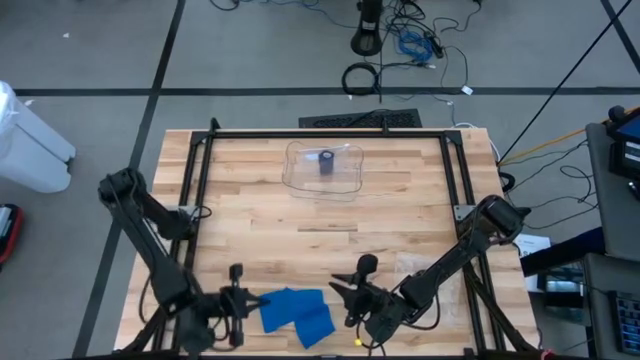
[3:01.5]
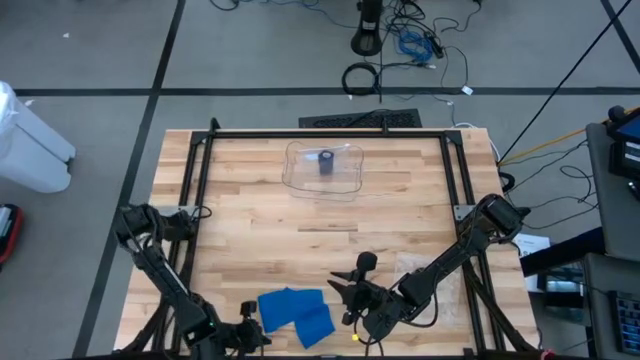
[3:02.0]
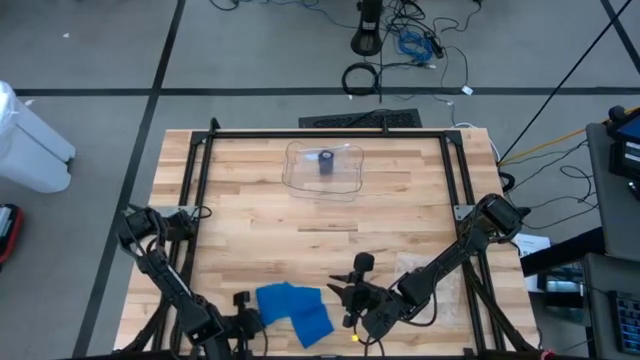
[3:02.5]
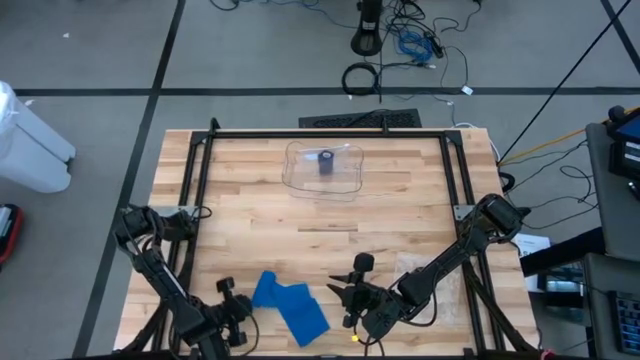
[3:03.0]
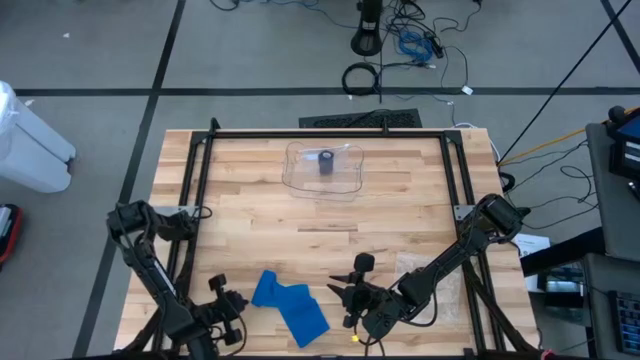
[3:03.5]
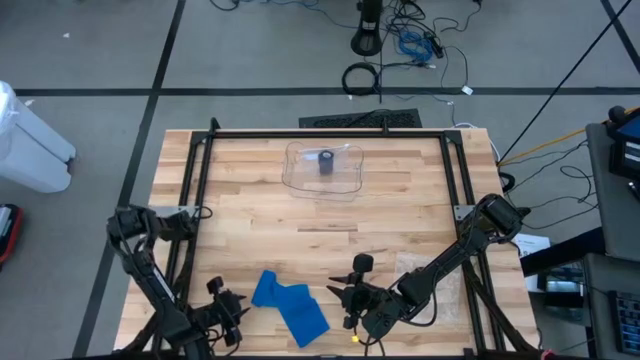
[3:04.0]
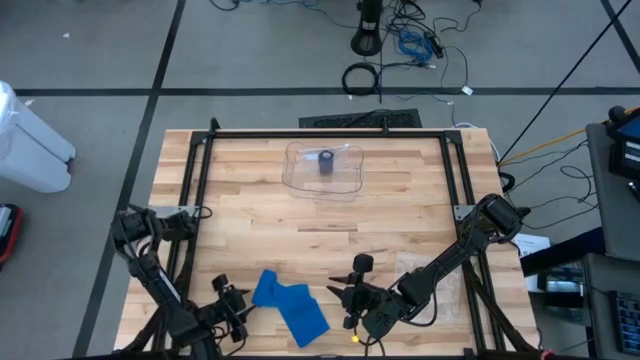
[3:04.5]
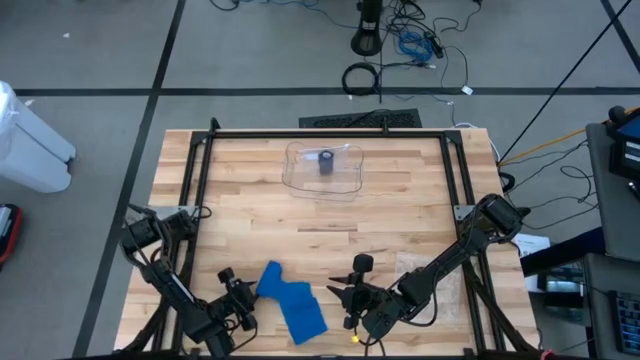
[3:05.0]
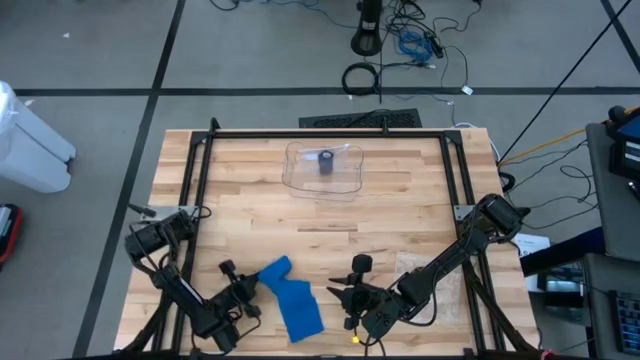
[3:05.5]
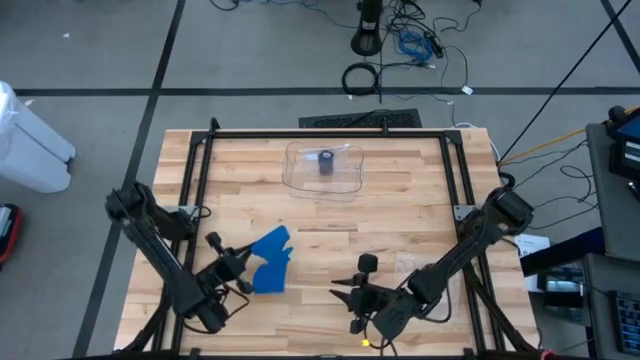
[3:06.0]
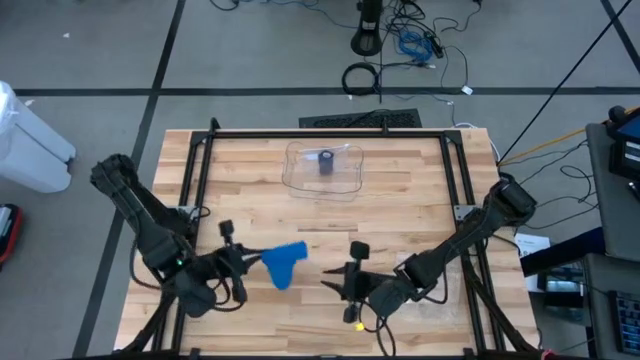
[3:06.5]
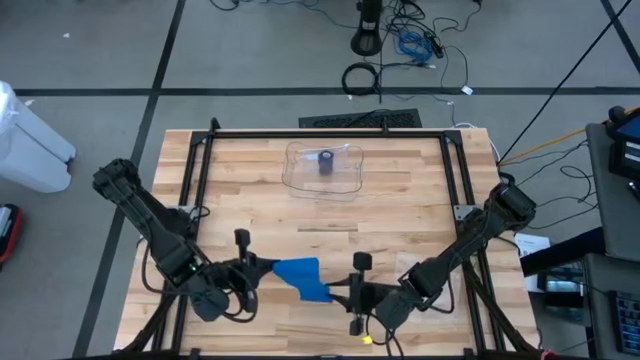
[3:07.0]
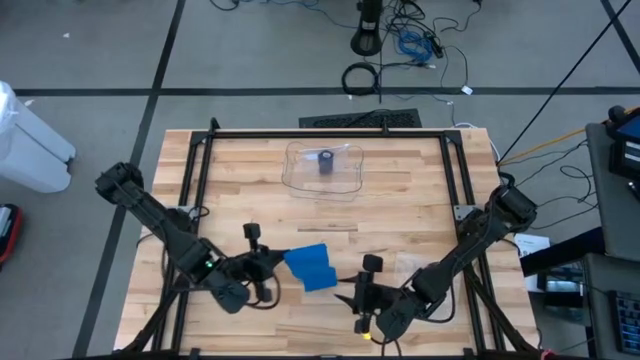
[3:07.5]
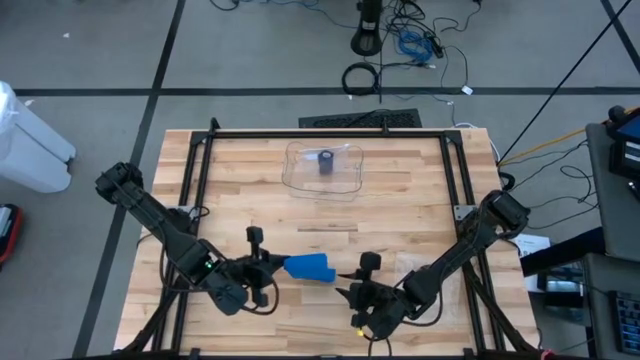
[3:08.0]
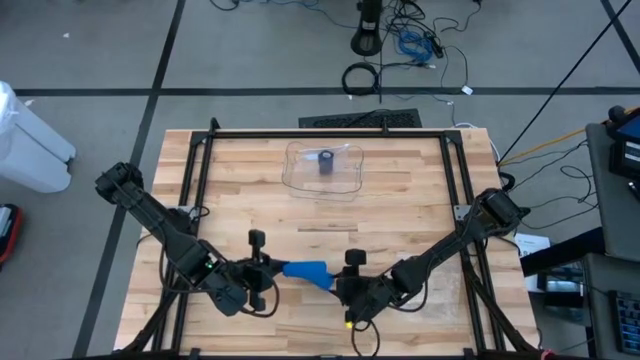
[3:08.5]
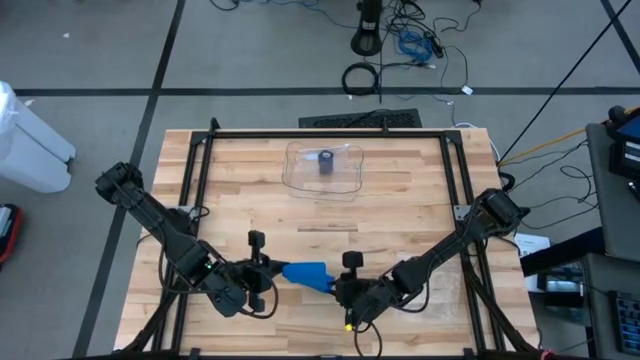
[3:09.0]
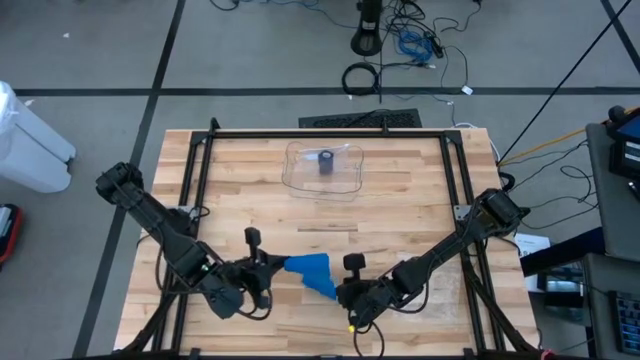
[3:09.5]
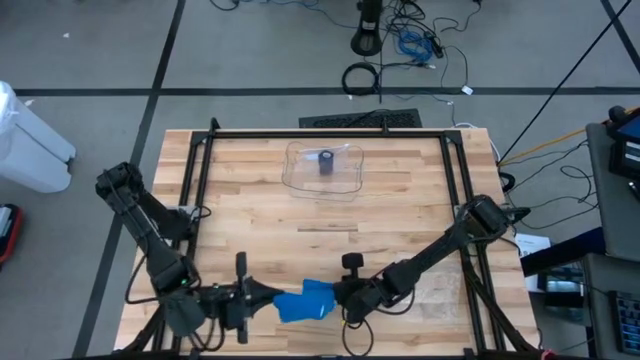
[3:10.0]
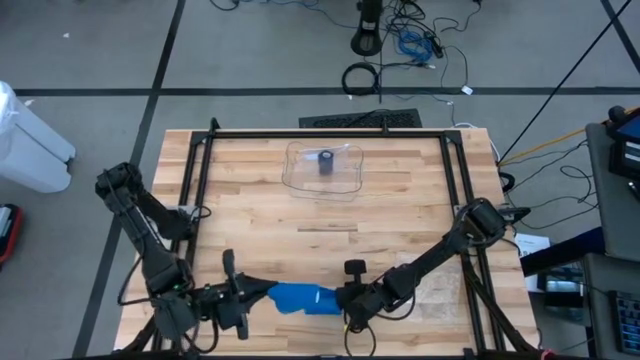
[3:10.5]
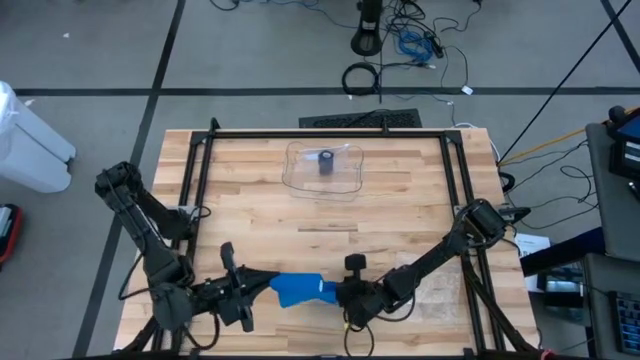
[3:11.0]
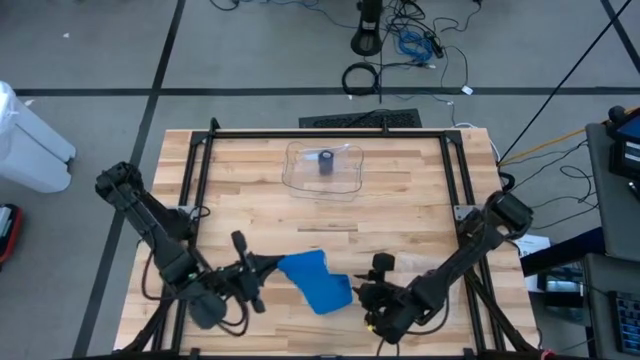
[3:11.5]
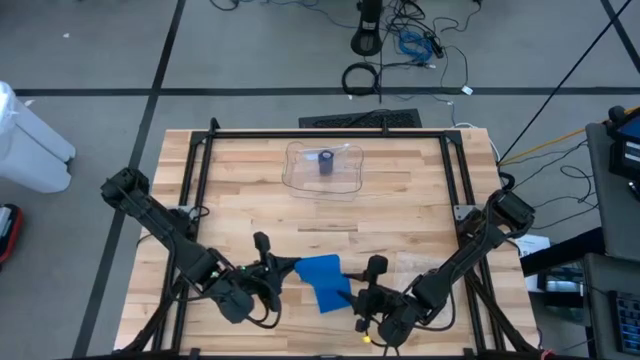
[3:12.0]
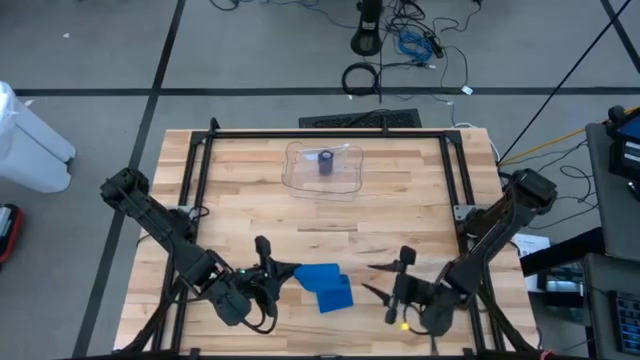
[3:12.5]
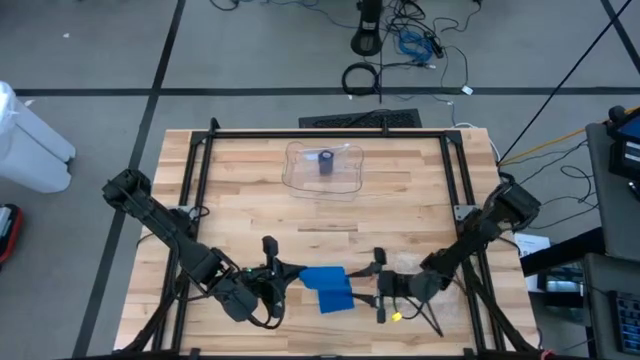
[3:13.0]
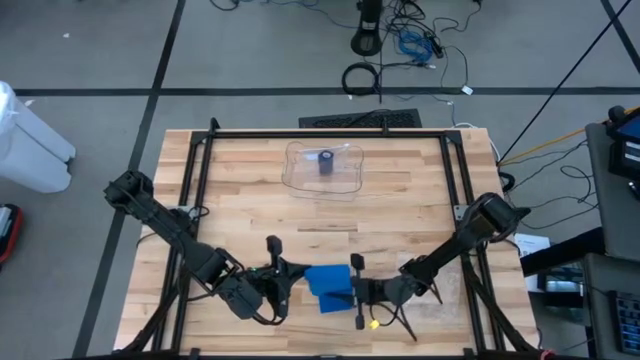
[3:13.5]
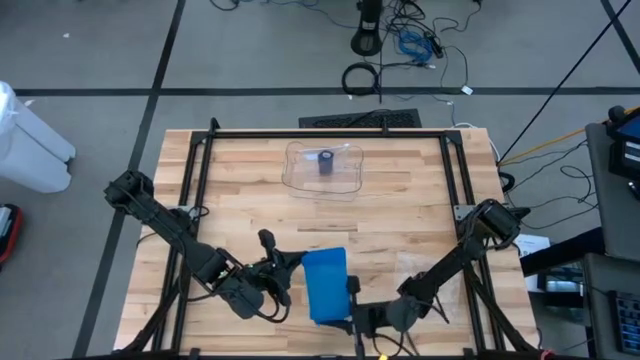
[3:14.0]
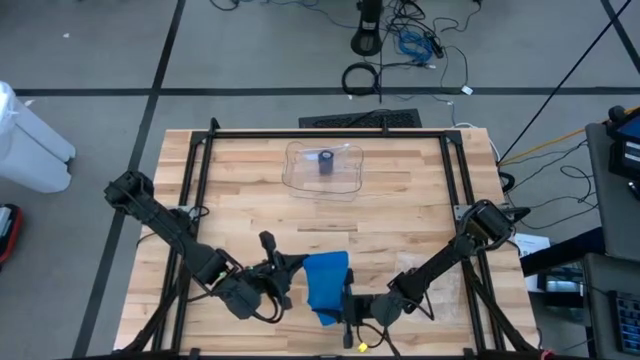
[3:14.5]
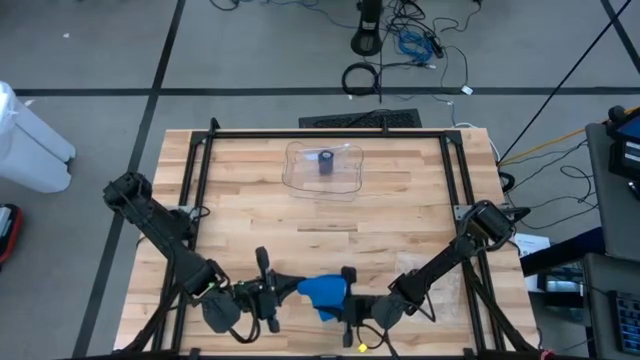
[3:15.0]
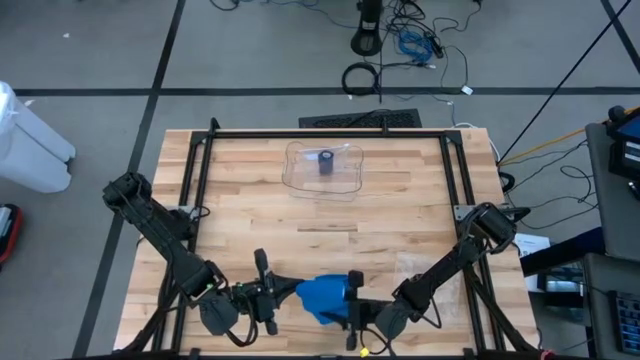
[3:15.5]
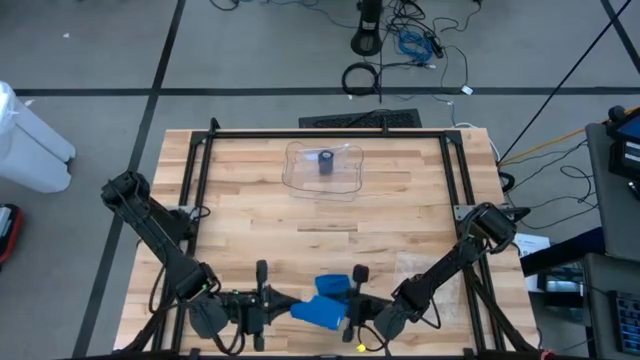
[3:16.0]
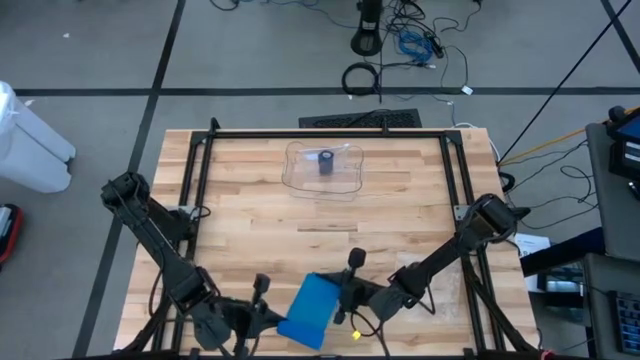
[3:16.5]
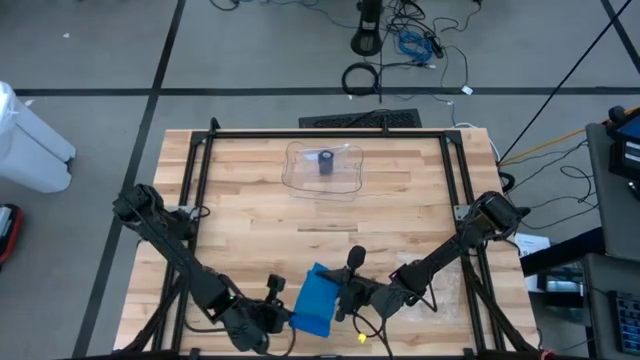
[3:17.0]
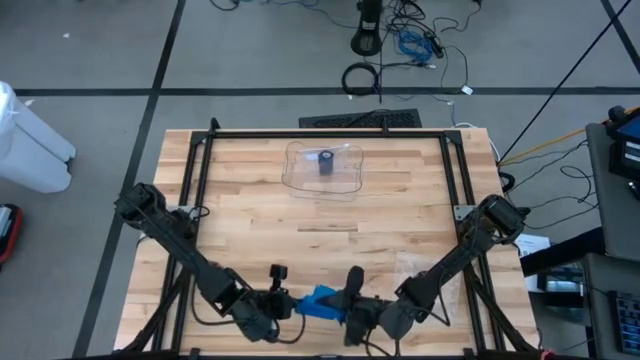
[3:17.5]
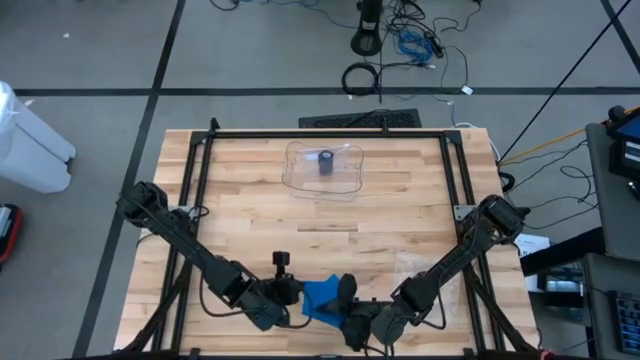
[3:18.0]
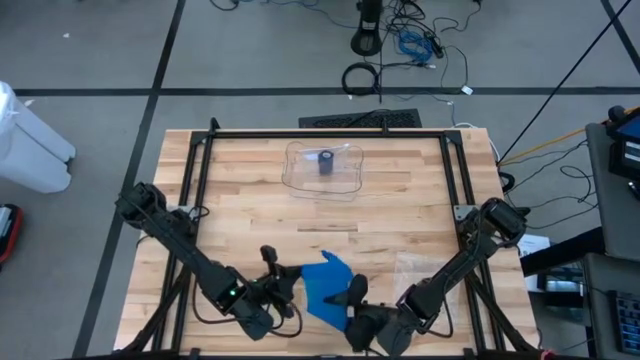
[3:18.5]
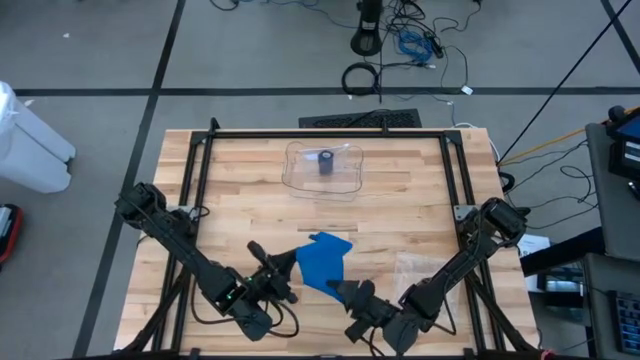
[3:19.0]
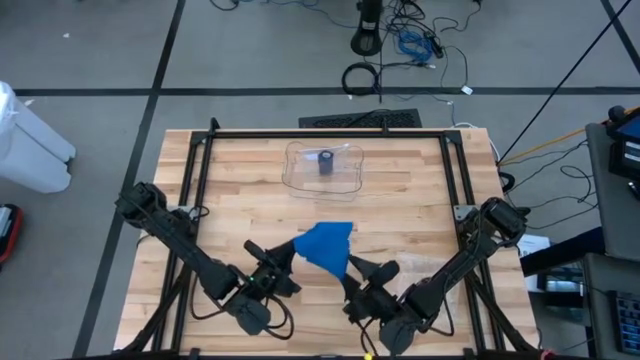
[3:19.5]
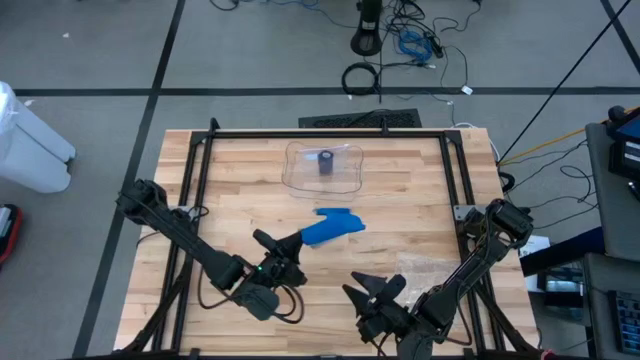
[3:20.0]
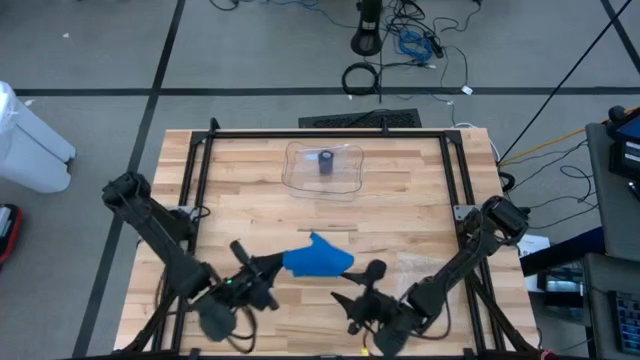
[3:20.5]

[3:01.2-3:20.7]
Task: Roll bandage
Roll the blue bandage
